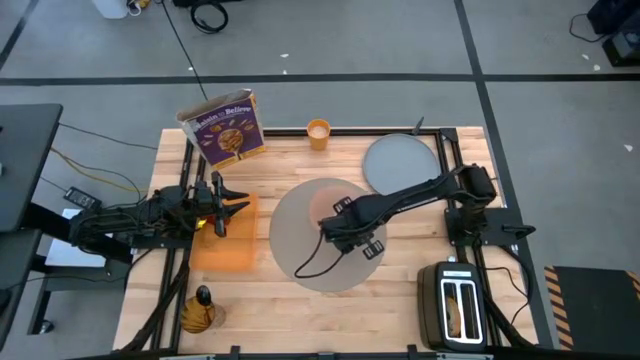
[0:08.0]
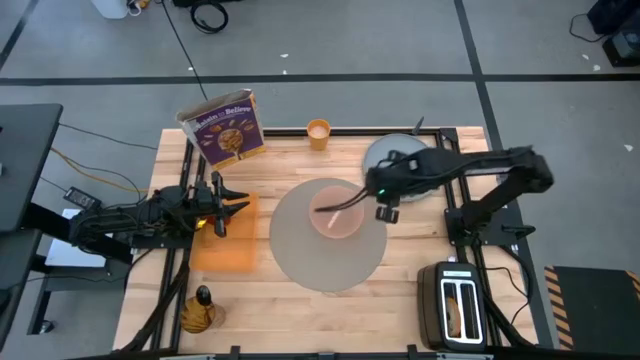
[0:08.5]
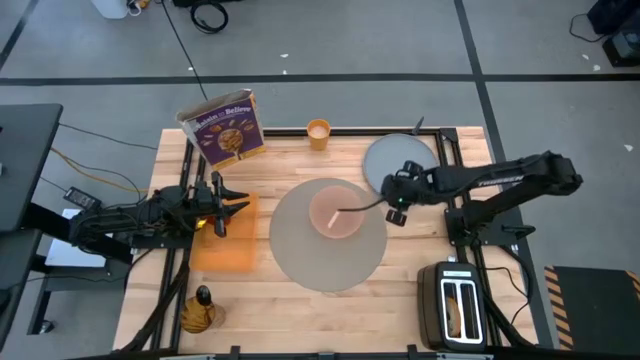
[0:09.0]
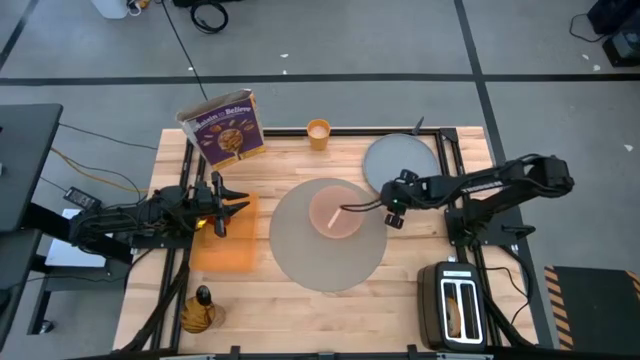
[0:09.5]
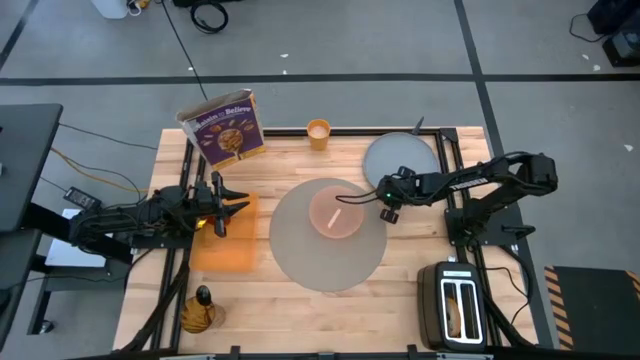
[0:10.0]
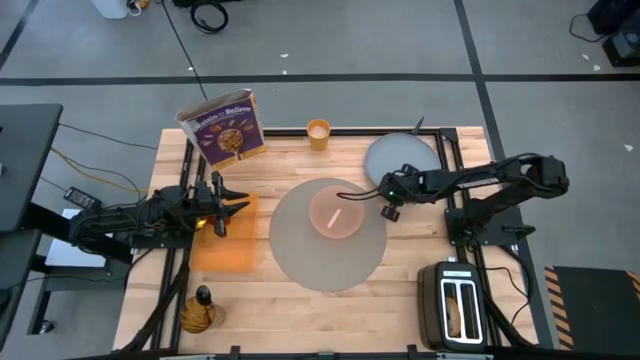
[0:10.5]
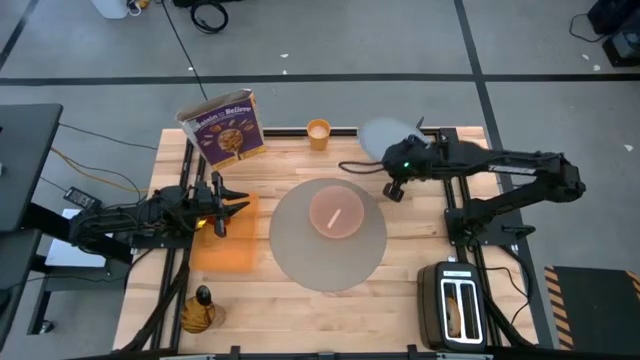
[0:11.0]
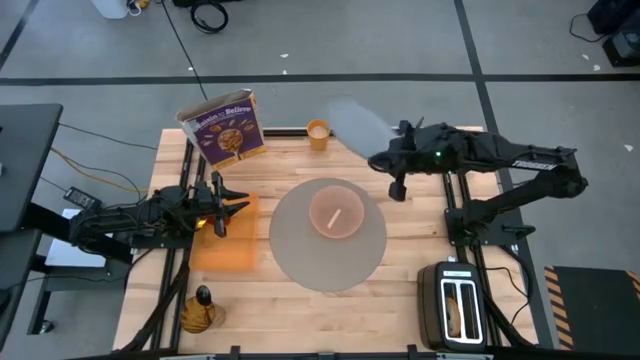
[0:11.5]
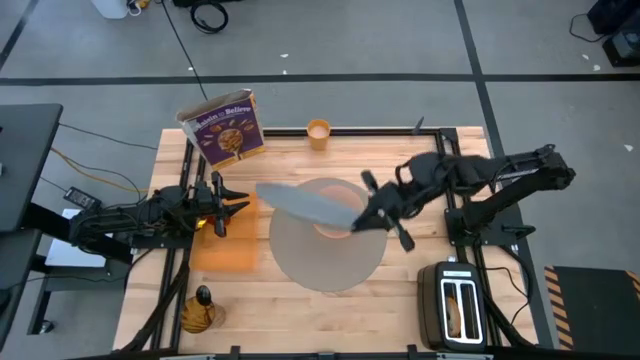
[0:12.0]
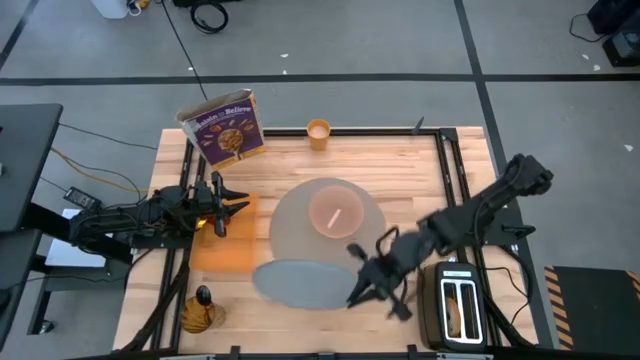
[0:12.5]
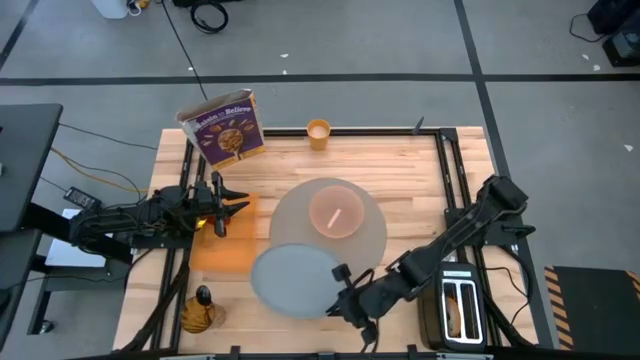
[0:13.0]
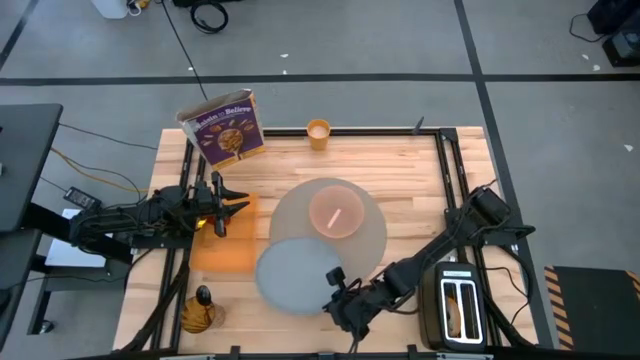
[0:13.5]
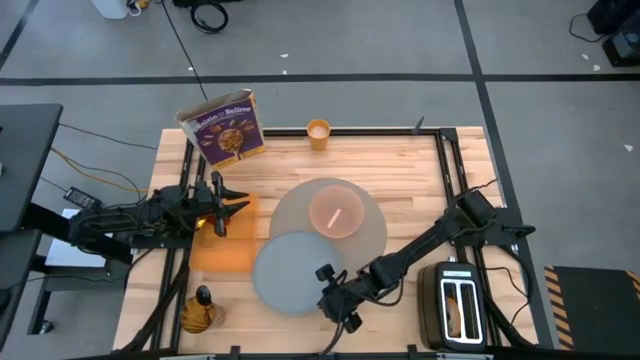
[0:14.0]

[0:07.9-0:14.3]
Task: Arrange a breakfast setting
Put the blue plate on the gray placemat to the bottom left of the pink bowl

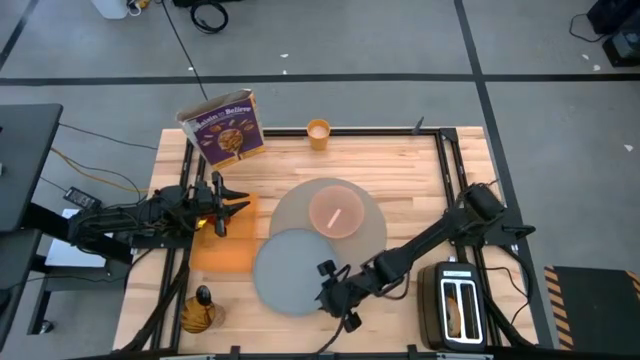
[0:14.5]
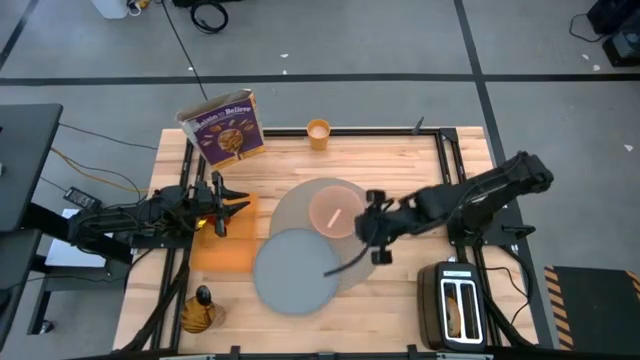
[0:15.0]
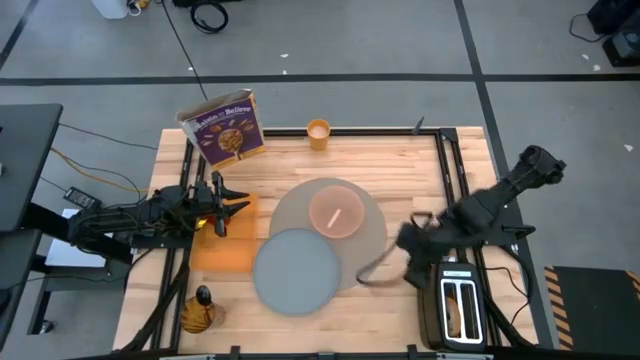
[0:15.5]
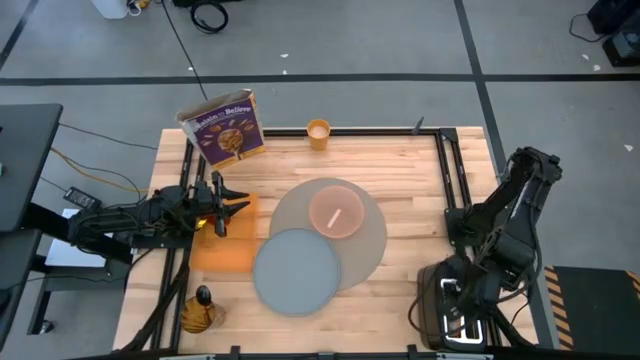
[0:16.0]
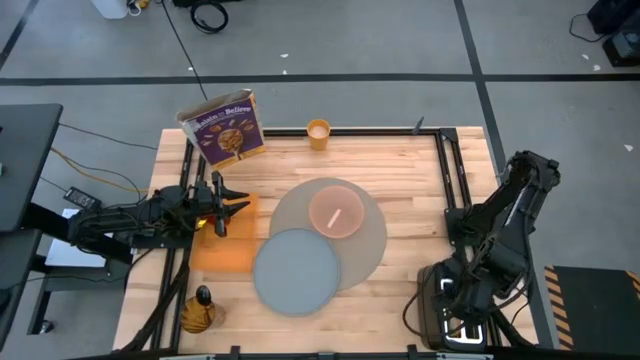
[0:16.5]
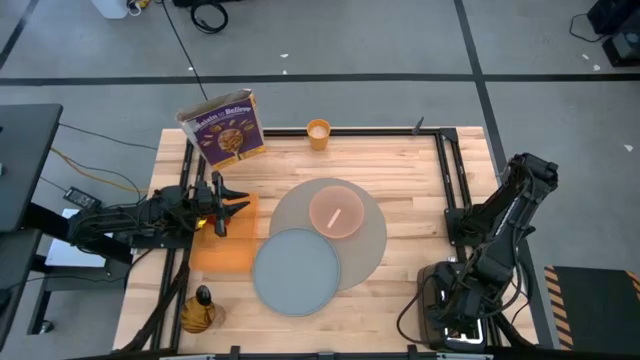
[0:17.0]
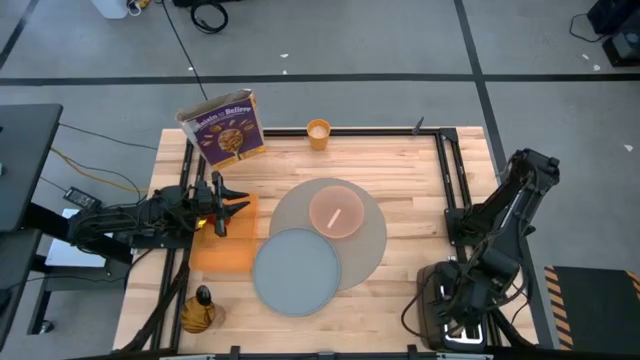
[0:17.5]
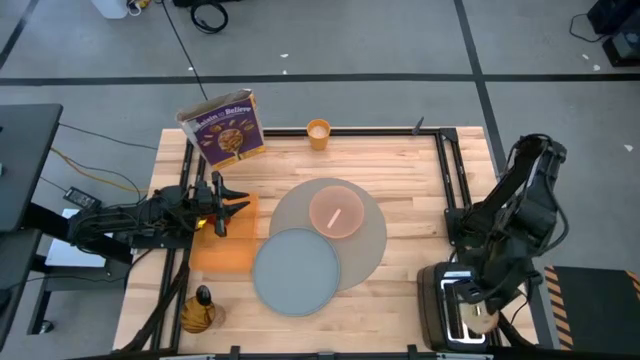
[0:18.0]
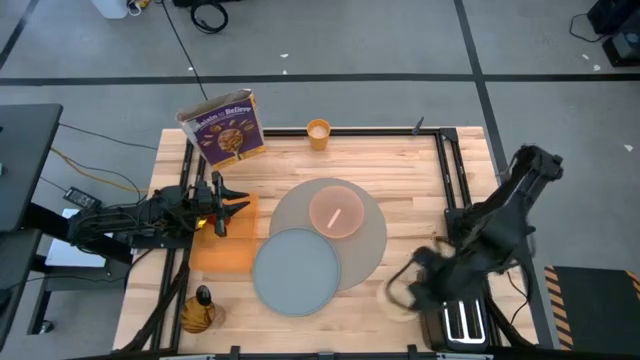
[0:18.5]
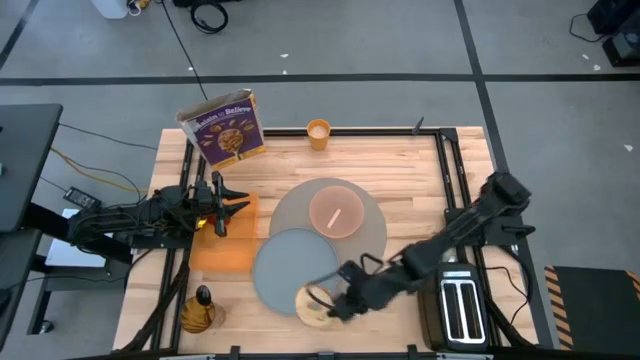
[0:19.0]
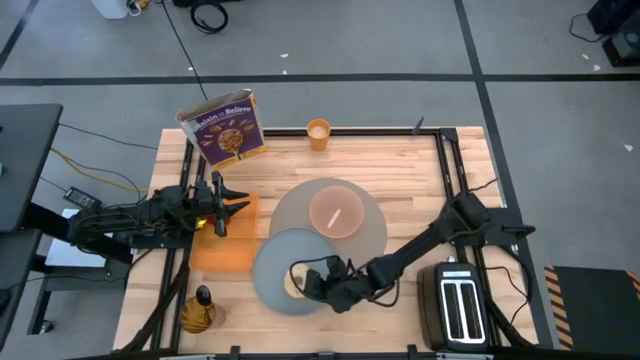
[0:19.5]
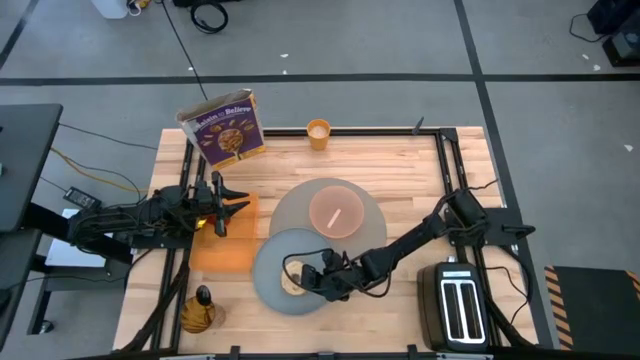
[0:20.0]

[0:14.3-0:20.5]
Put the bagel from the toaster on the blue plate

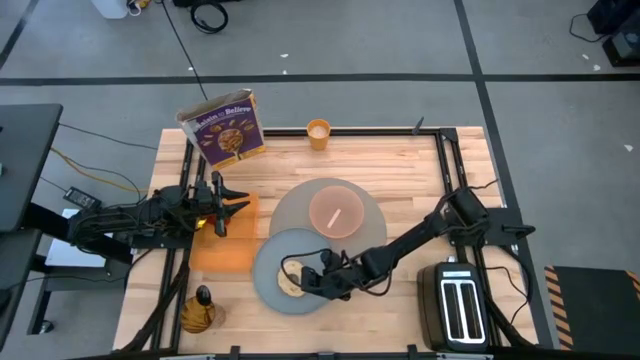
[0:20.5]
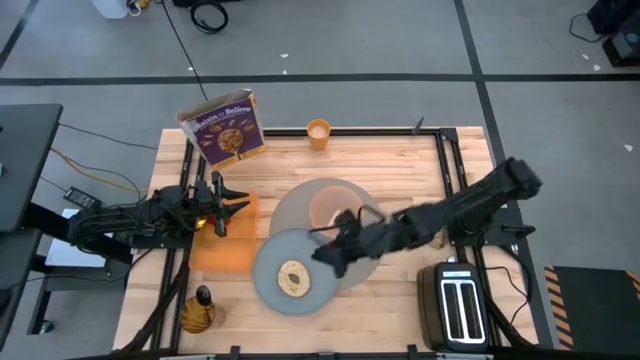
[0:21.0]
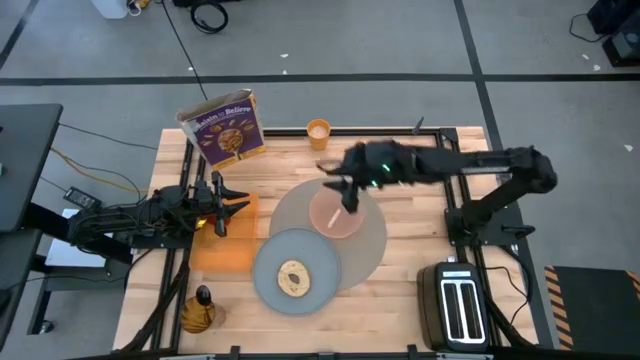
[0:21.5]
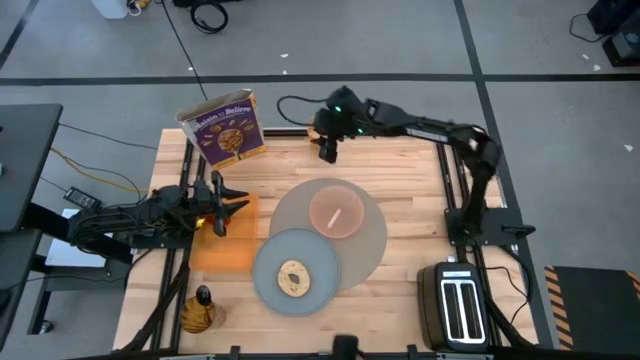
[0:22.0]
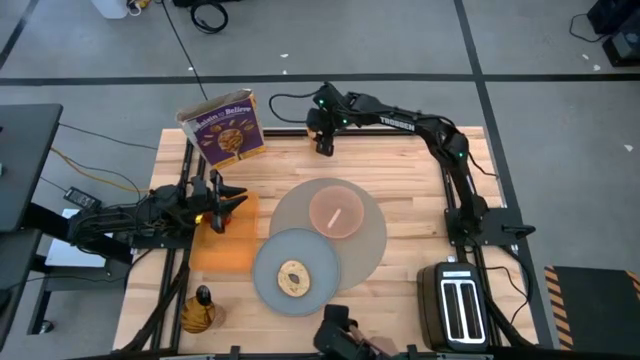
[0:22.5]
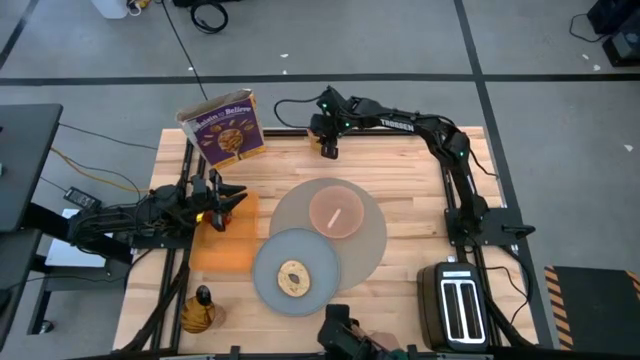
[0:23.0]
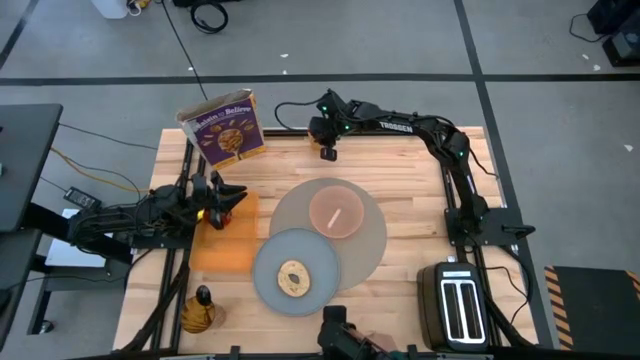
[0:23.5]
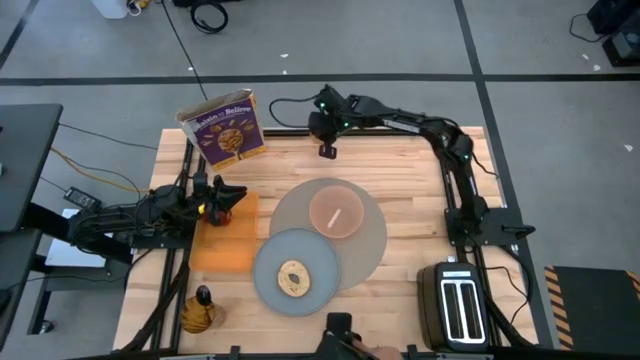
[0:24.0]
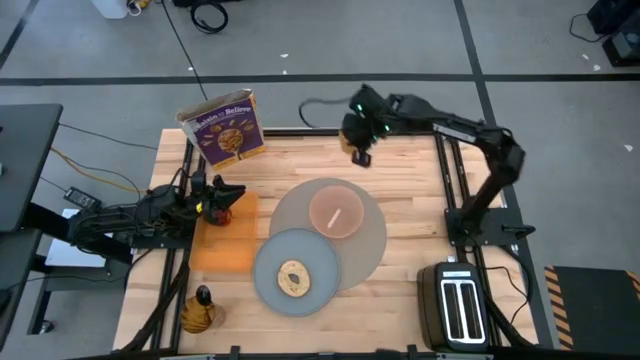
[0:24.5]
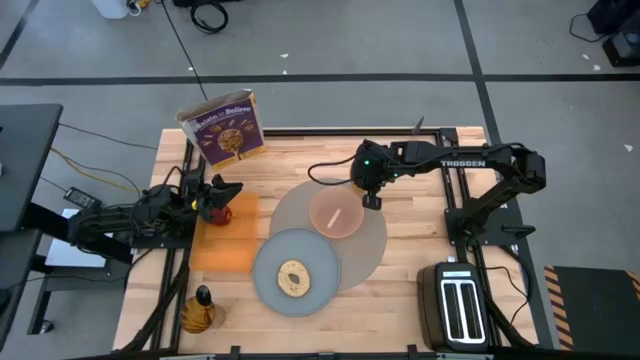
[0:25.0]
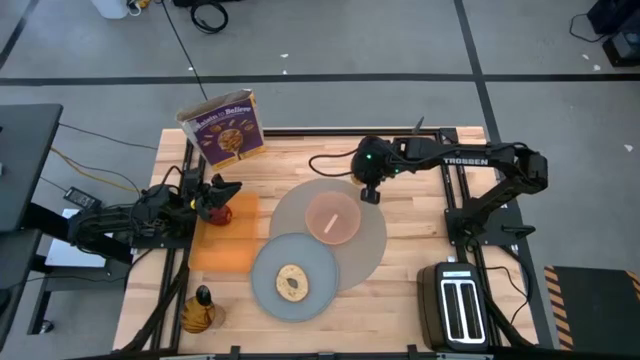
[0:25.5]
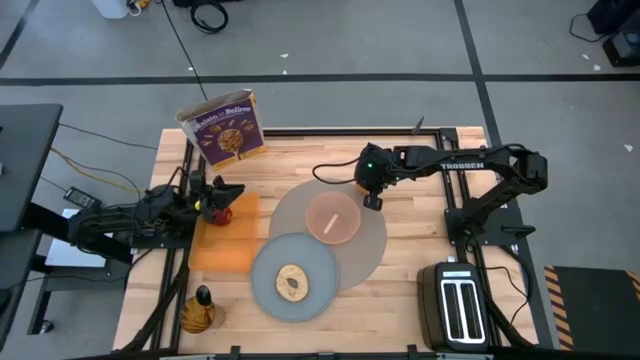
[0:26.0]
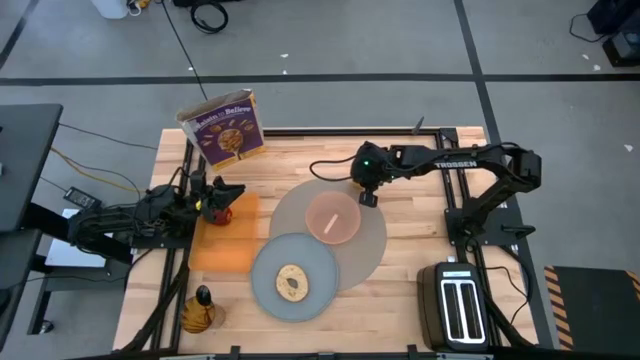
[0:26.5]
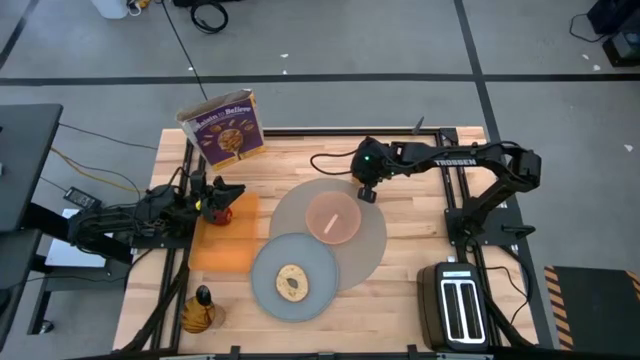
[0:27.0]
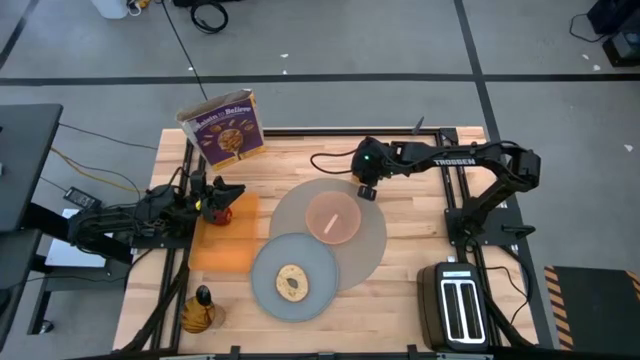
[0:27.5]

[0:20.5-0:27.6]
Put the orange cup of milk to the top right of the gray placemat

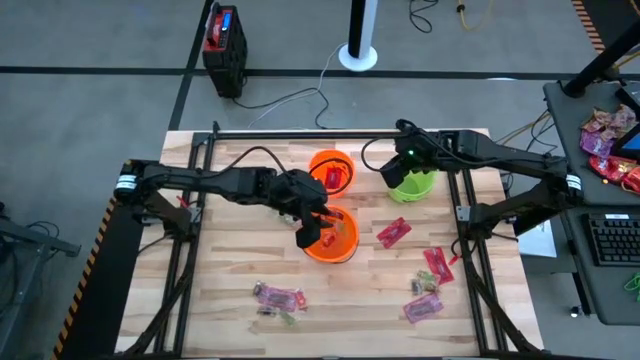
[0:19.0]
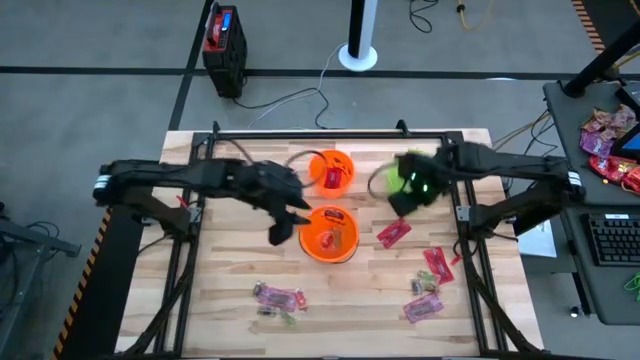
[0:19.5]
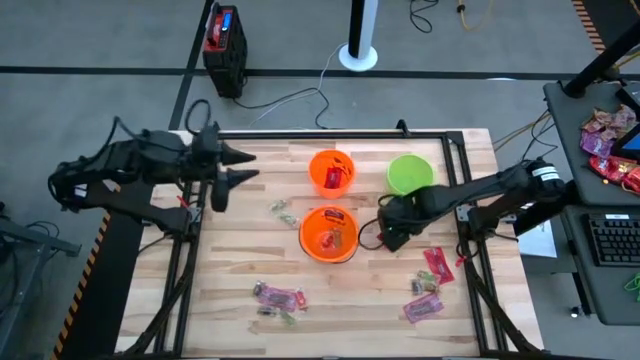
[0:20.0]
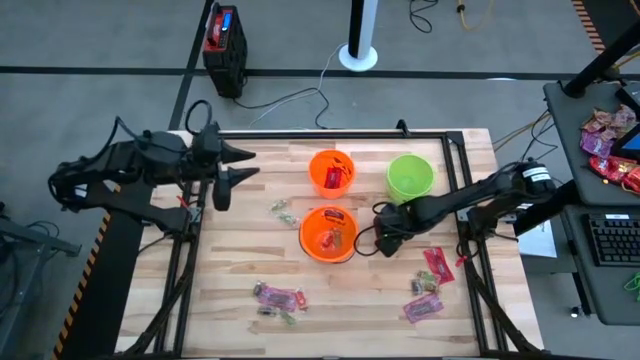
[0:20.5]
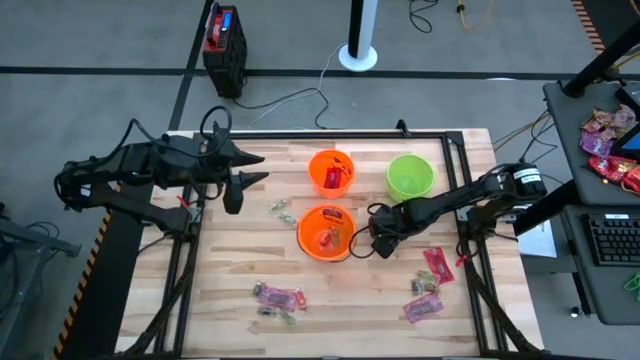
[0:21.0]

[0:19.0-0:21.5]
Task: Sort candy by brand, put in halloween buckets
Put the top red candy into the top orange bin
